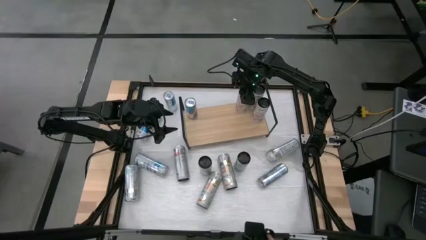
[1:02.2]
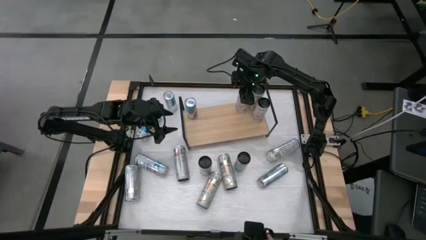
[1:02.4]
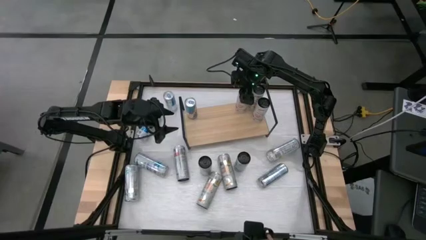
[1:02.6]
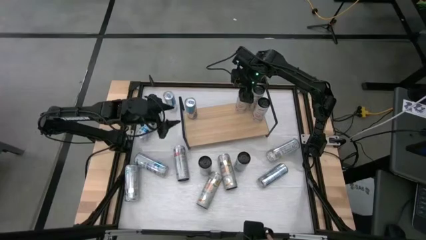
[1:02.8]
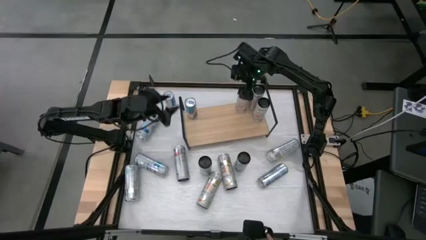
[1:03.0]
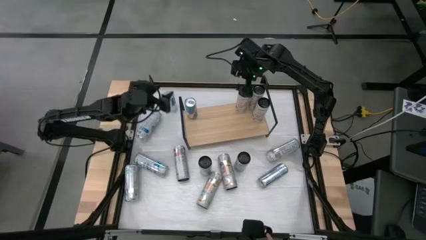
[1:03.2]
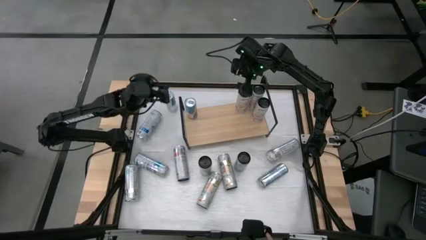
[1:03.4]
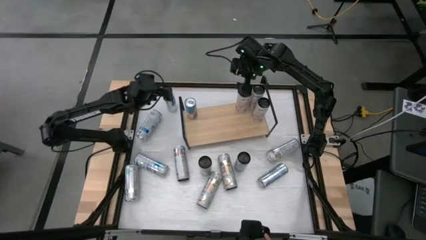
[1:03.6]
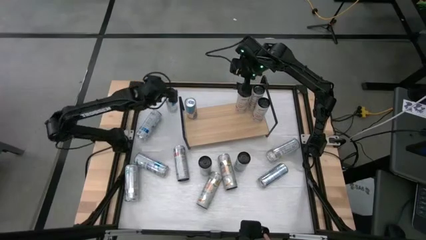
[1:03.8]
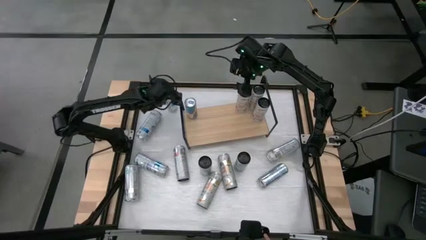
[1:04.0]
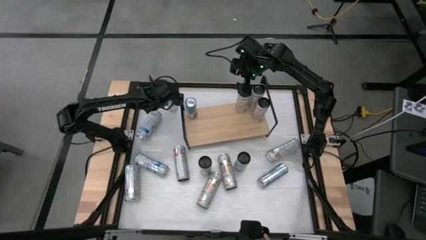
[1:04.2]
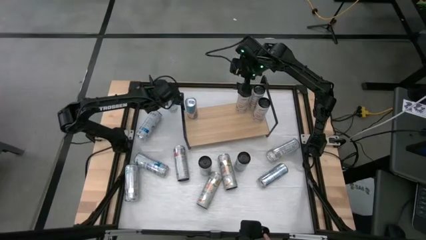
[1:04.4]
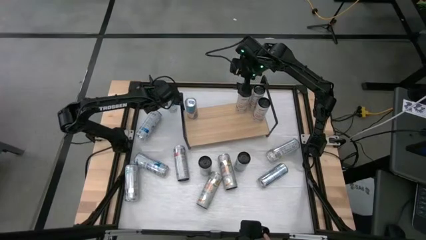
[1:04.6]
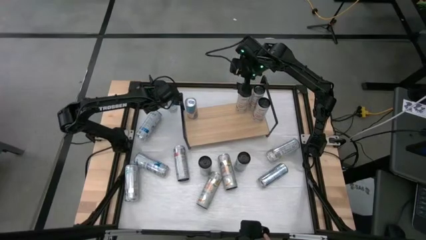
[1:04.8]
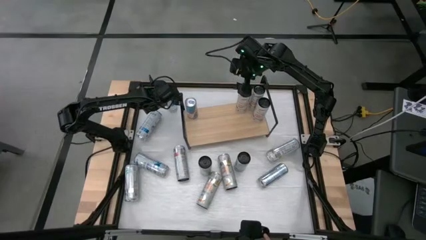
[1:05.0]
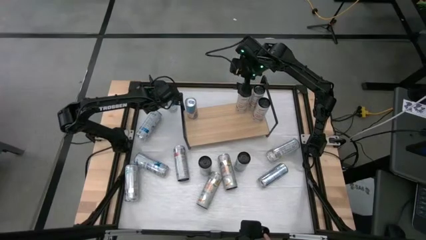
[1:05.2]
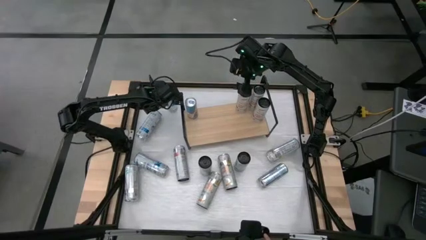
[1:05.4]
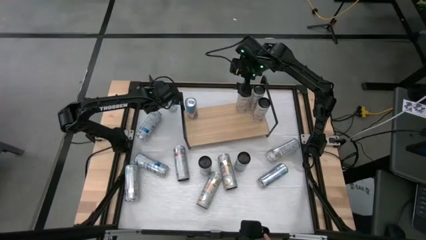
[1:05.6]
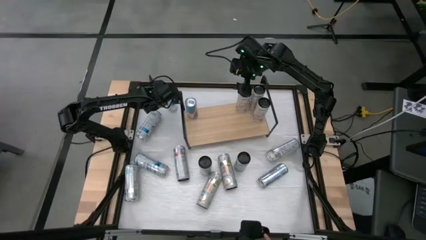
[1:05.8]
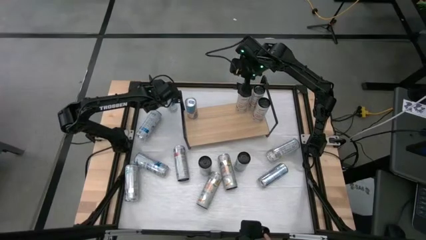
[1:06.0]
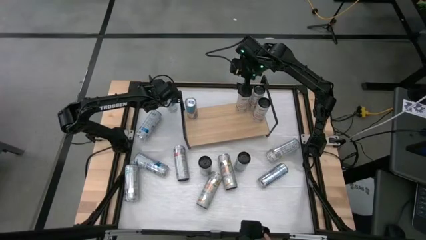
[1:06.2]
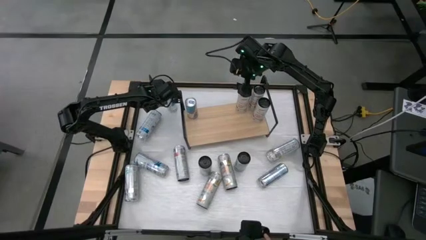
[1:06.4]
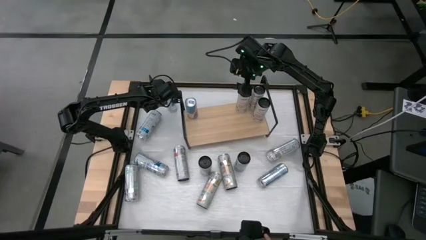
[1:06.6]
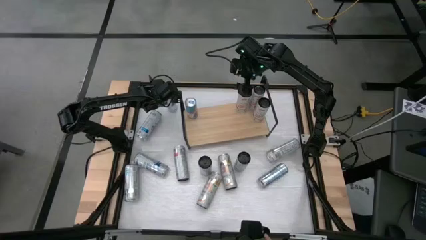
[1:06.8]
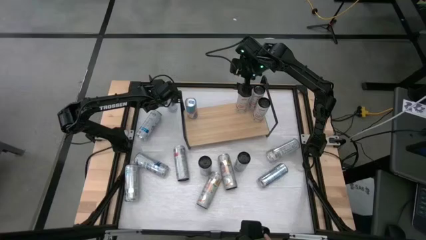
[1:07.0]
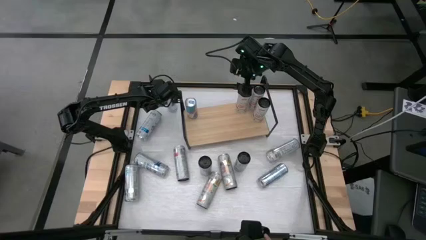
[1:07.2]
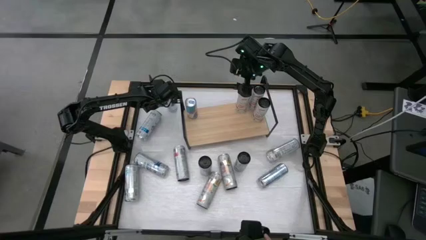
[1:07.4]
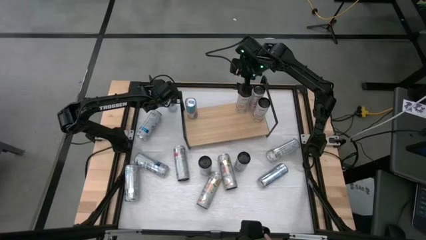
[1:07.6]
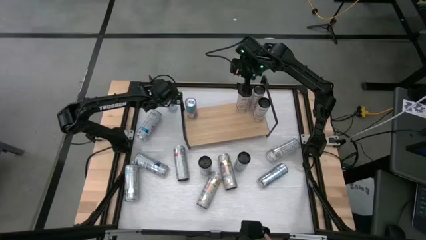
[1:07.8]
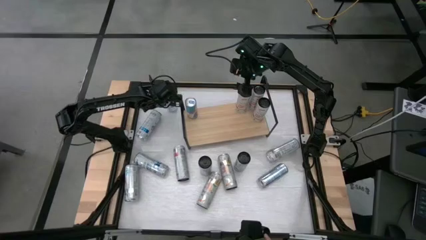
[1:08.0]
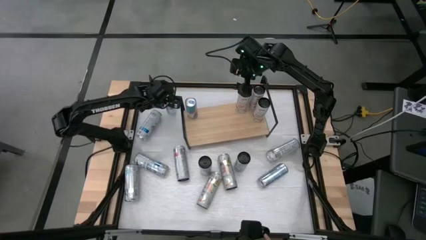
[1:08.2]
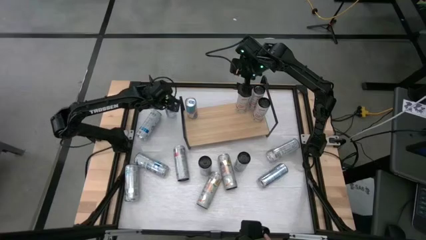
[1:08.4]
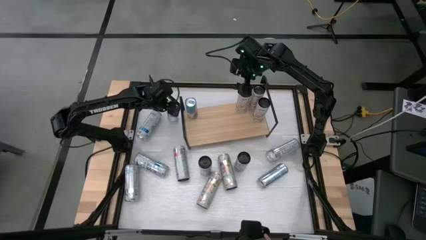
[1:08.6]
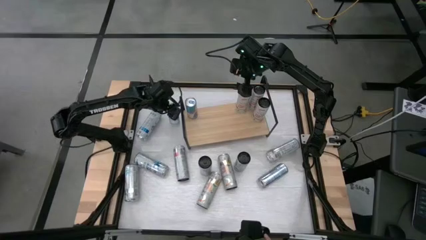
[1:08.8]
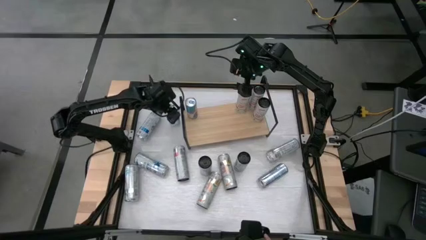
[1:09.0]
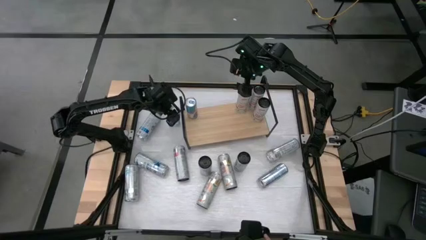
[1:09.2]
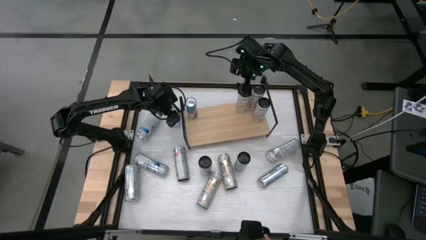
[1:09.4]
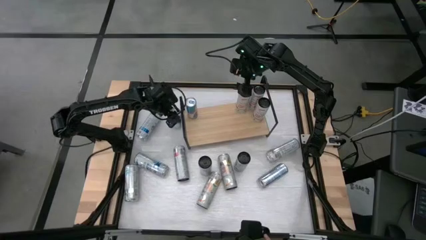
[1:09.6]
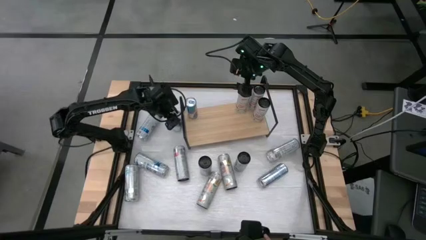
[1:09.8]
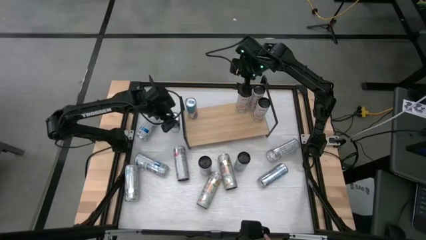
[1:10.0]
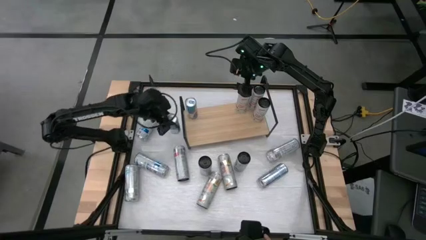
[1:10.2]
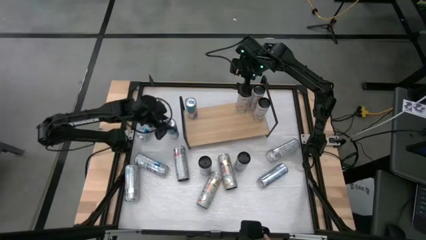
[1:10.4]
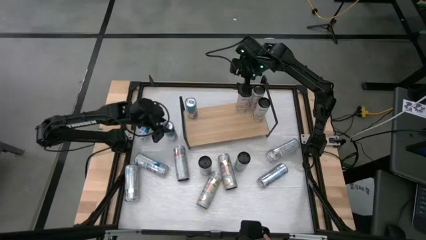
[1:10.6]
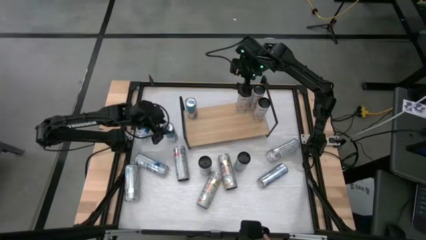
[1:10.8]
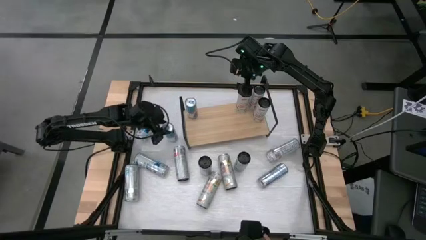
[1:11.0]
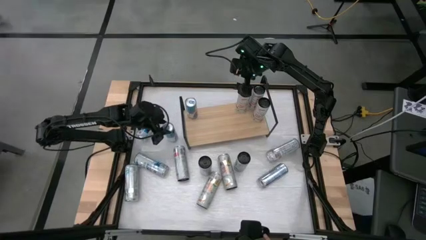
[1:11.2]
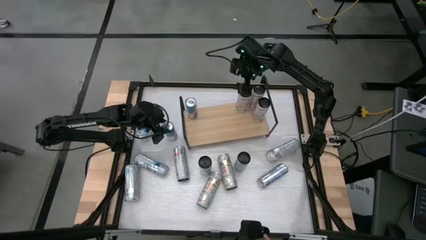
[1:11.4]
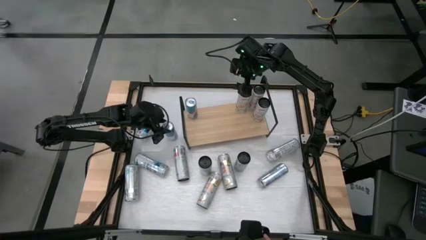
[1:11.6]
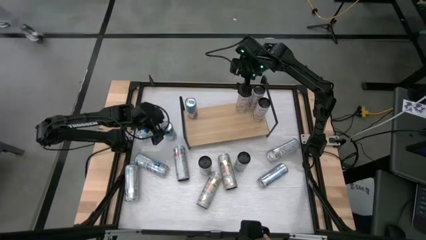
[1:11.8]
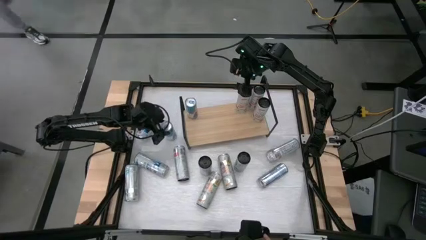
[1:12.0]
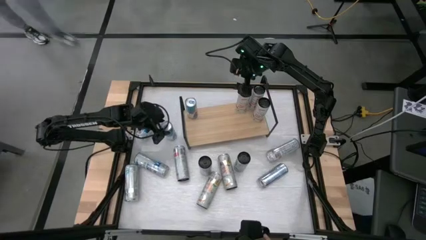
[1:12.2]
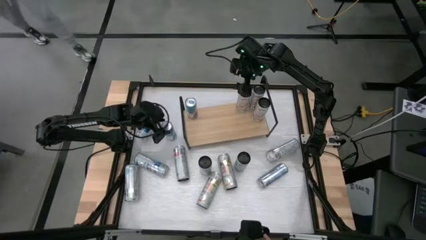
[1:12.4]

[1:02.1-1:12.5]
Task: Place canned beverage on shelf
Put the blue soda can on the shelf aligned with the other blue soda can

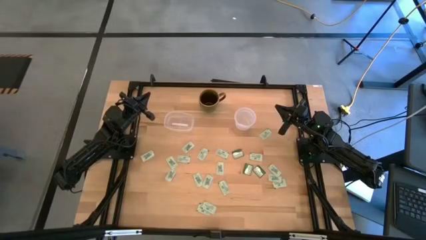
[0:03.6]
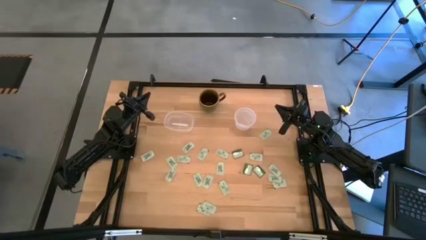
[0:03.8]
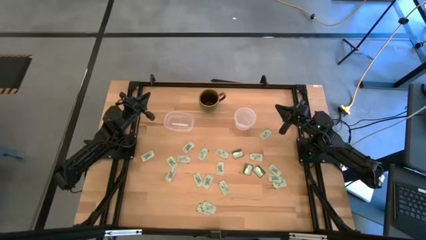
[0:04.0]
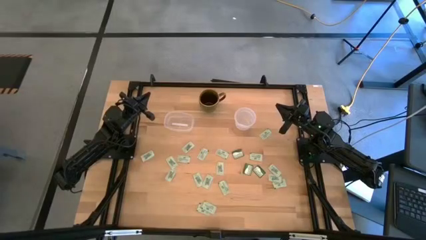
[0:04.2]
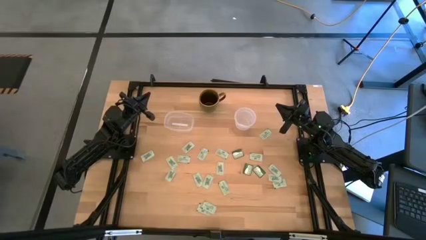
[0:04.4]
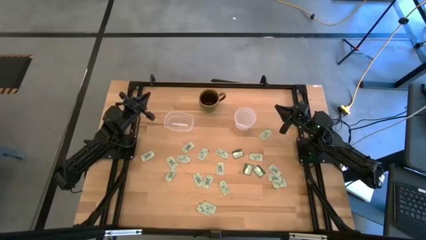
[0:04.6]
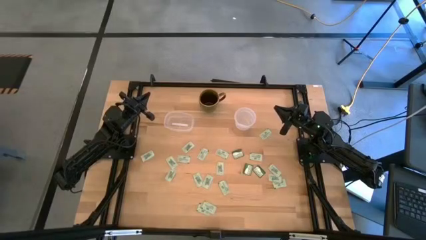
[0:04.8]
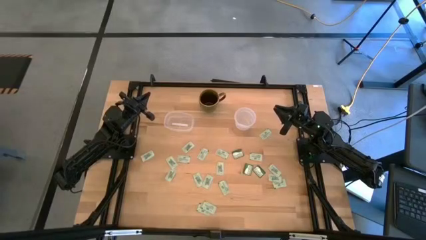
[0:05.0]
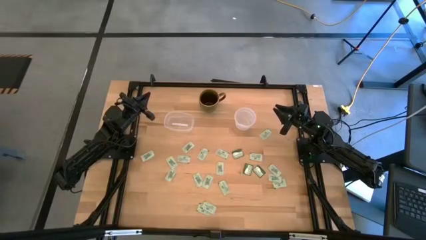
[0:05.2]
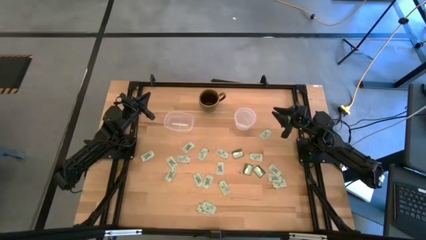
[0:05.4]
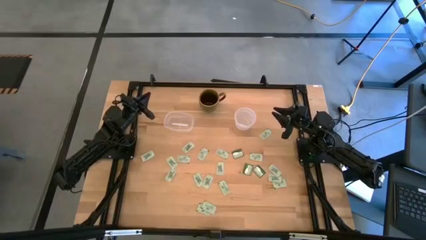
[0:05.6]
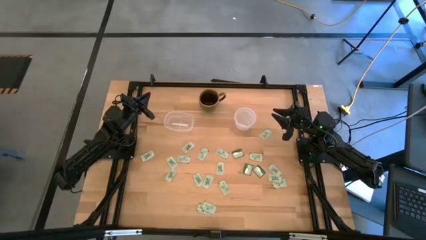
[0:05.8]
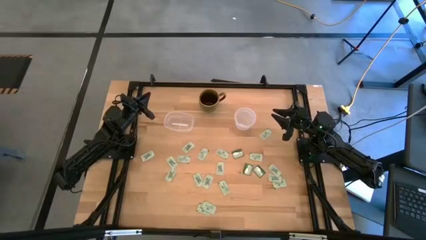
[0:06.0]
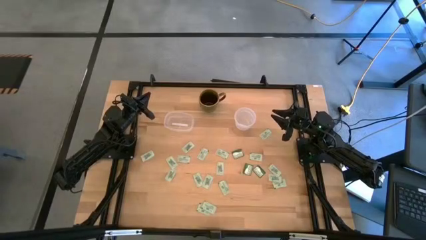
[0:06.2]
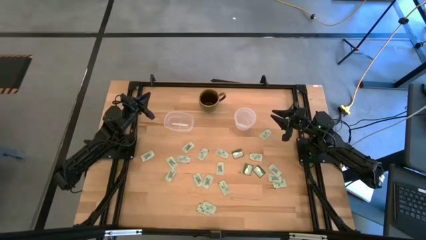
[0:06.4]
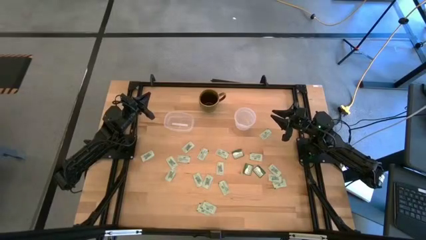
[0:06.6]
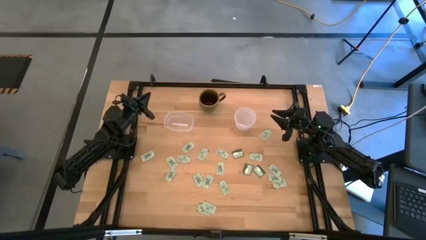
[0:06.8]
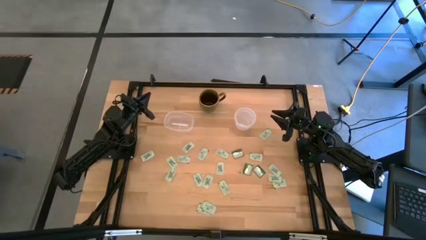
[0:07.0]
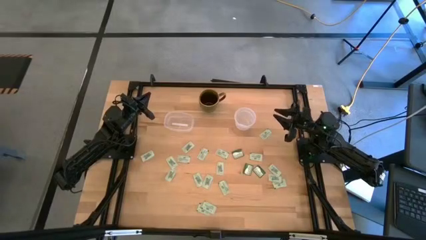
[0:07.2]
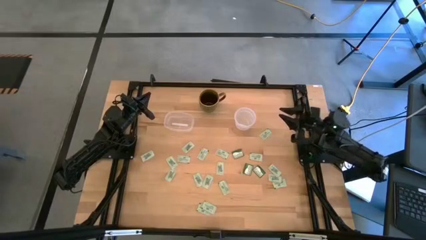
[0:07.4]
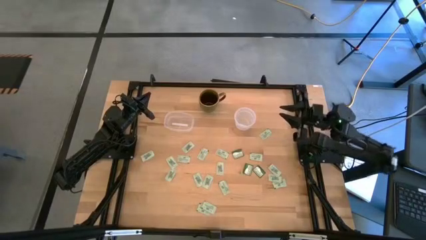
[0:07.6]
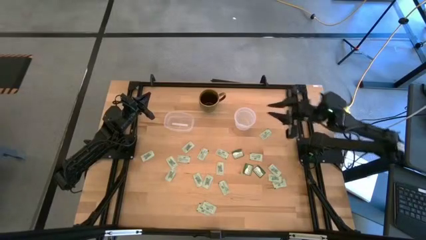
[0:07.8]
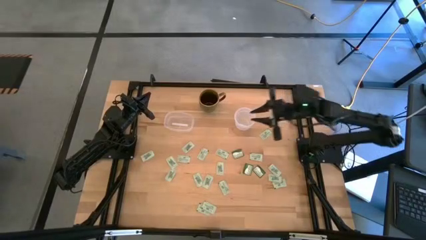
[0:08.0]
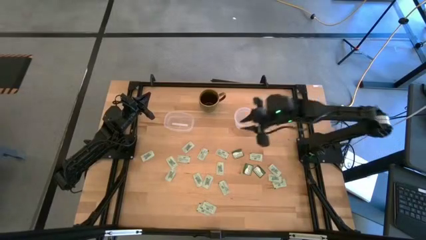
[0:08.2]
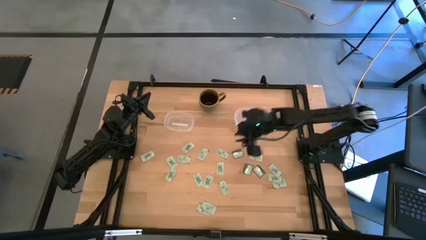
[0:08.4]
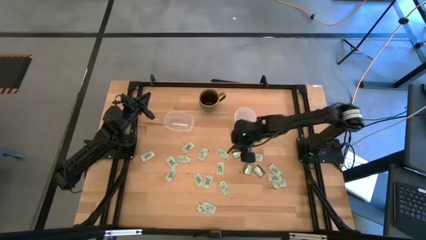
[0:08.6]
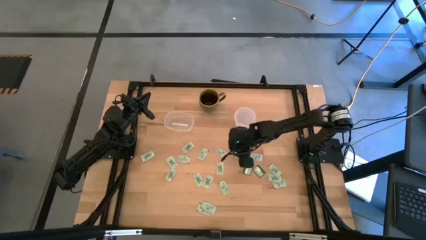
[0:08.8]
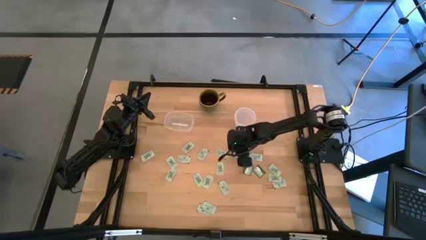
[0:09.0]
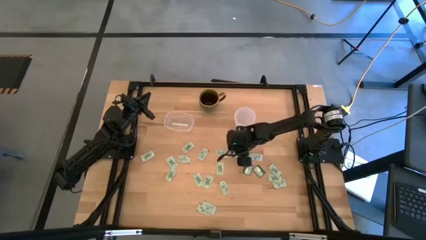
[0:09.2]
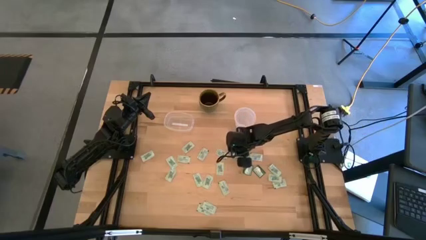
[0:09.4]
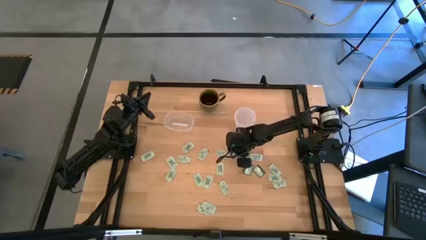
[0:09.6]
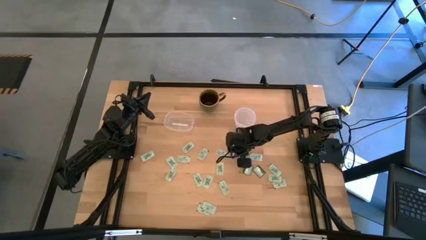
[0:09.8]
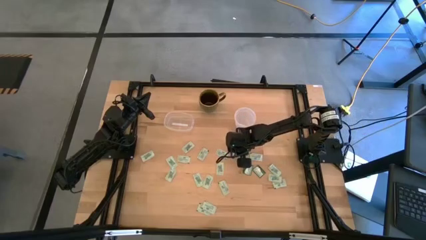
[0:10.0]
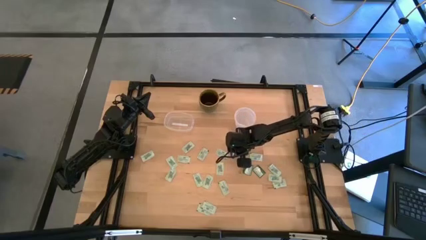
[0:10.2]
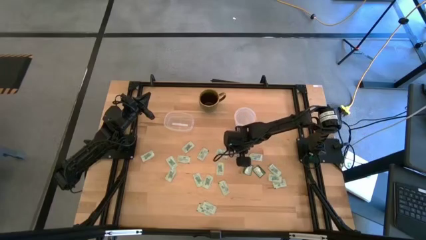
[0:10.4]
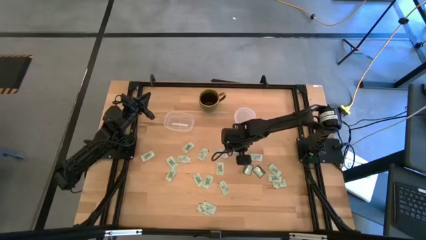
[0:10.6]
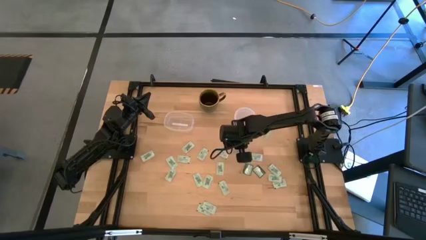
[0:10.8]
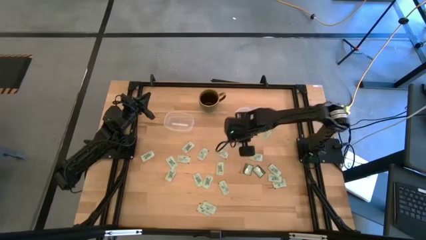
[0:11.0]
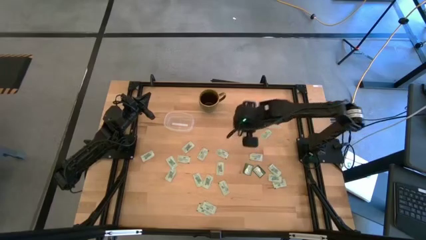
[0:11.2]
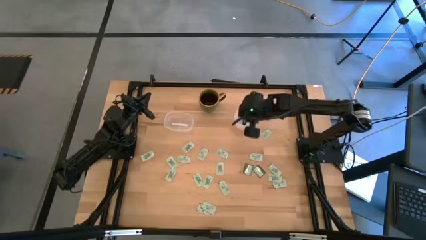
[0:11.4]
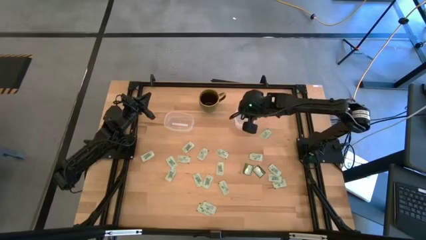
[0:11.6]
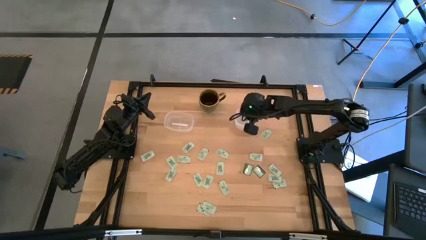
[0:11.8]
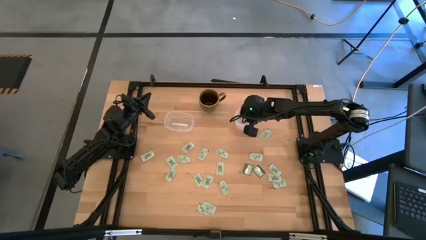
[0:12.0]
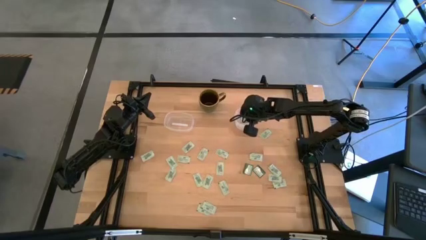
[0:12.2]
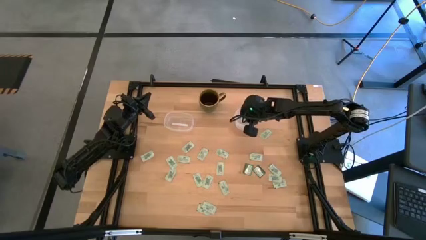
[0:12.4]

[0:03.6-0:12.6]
Task: Pick and place Stevia / Truvia into bins
Put the green stevia packet into the right transparent container
